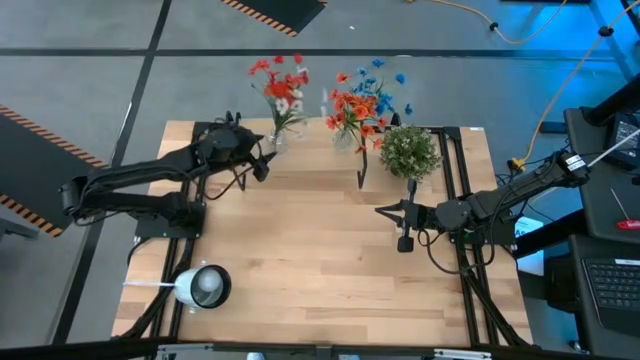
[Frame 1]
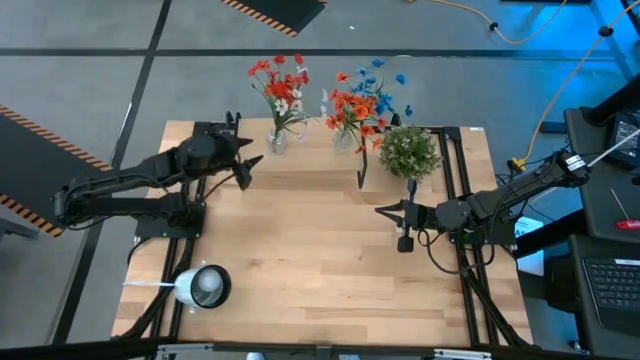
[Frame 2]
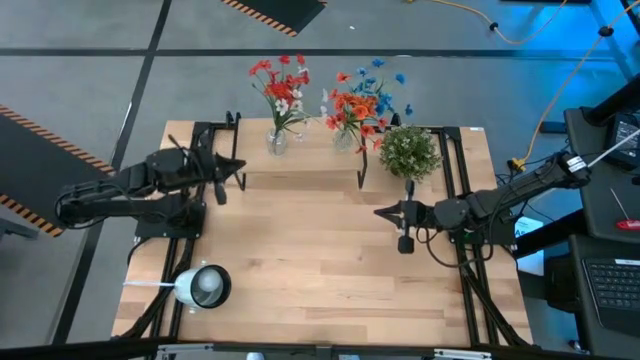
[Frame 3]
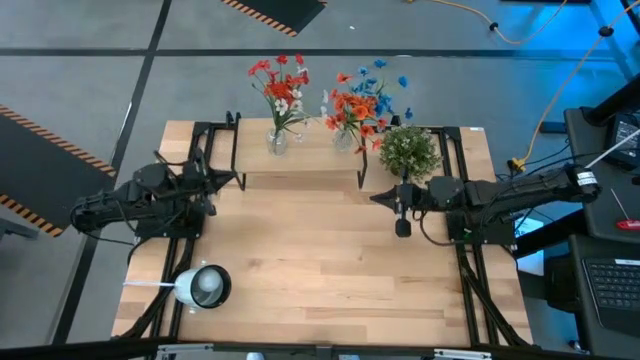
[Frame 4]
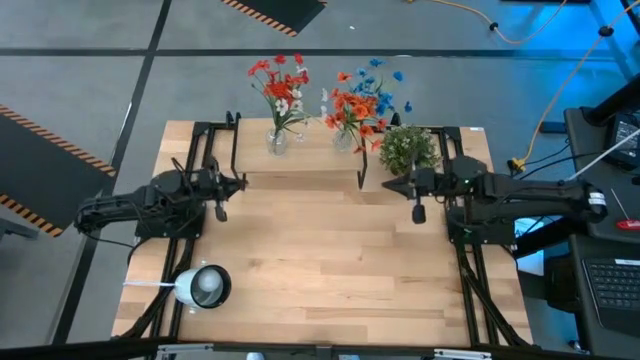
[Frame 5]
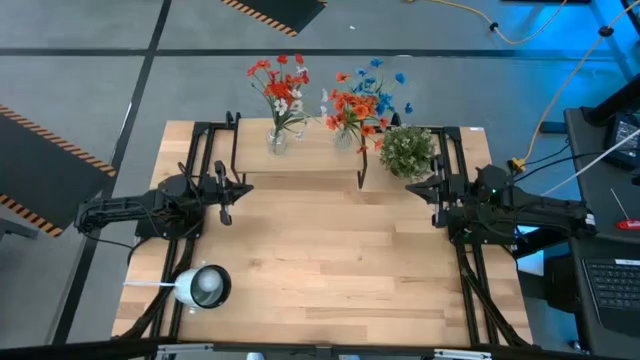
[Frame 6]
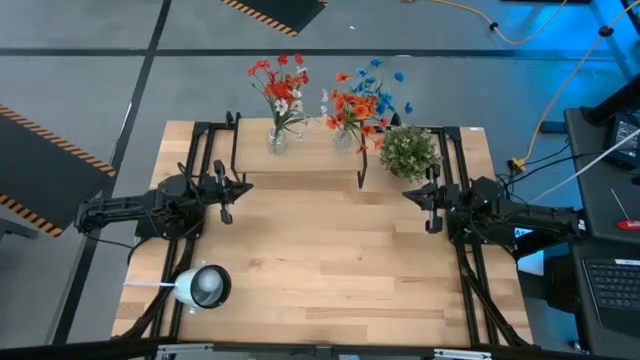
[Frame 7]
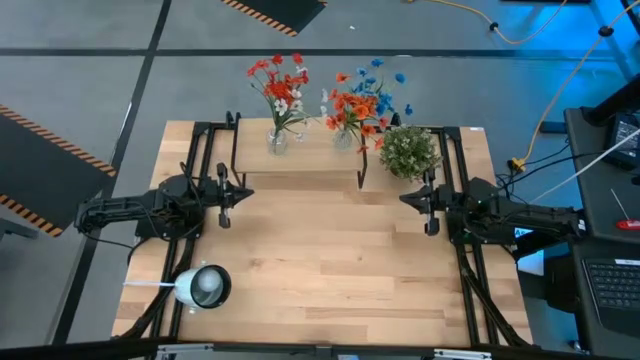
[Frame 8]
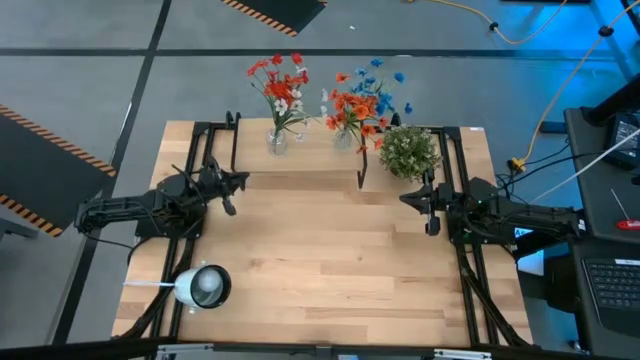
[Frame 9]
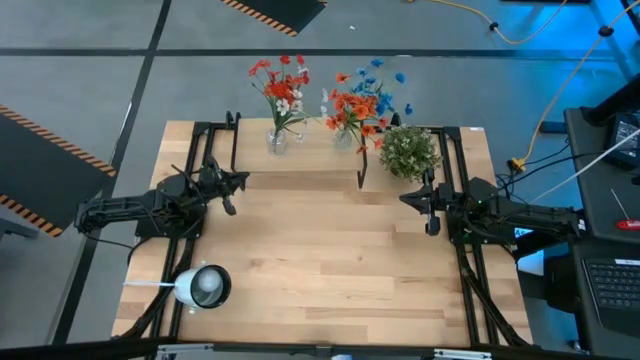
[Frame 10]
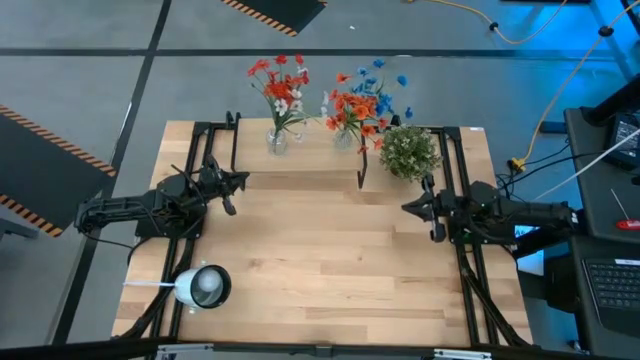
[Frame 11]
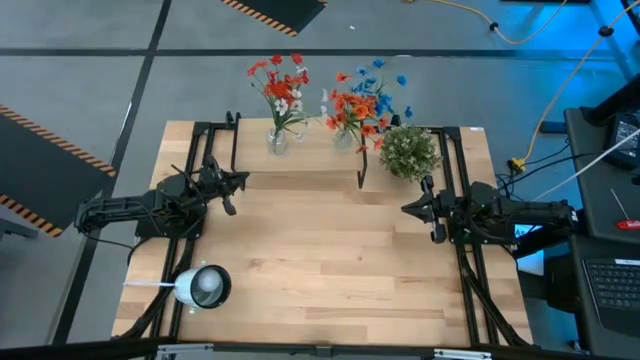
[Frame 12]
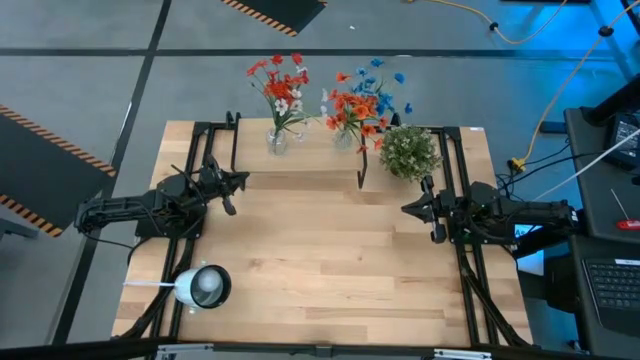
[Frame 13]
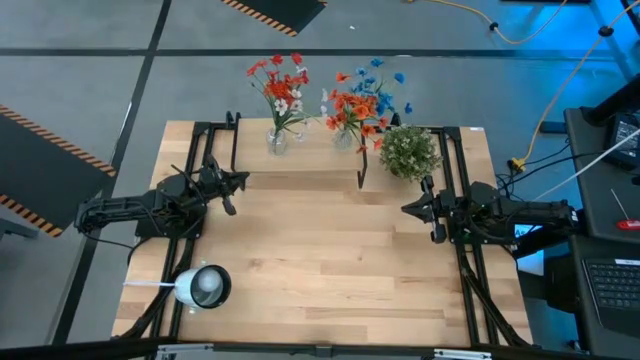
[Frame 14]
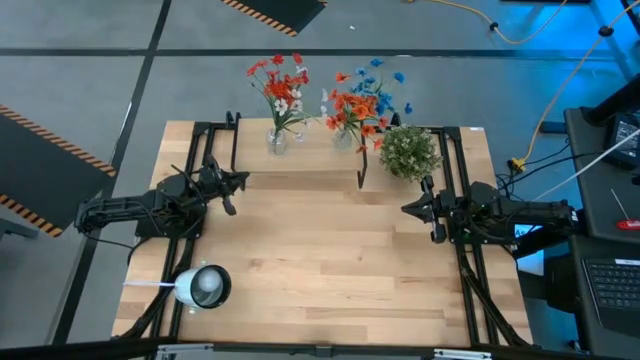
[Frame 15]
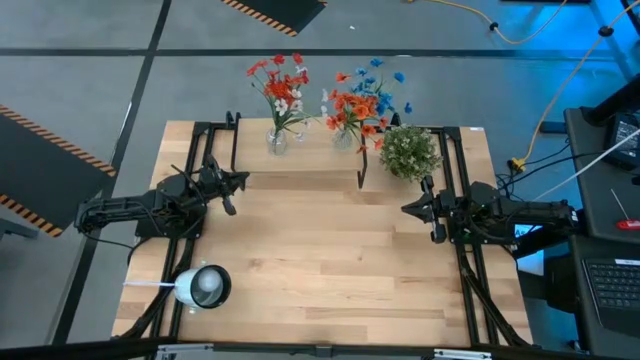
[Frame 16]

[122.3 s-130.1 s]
Task: Pick and place flowers into a vace then onto a shelf
Return to Home Position

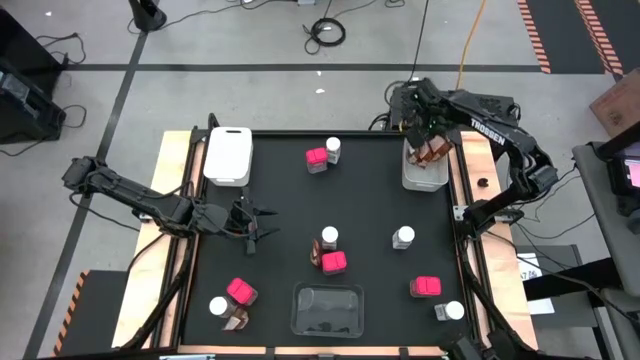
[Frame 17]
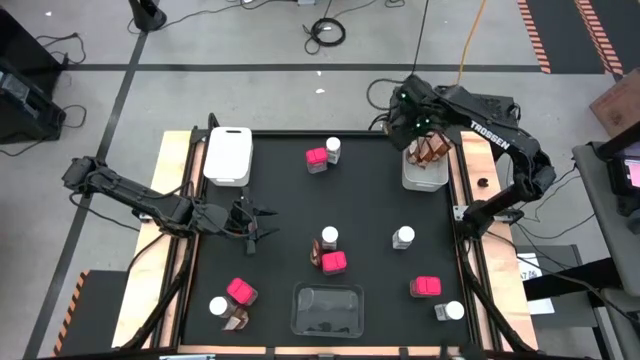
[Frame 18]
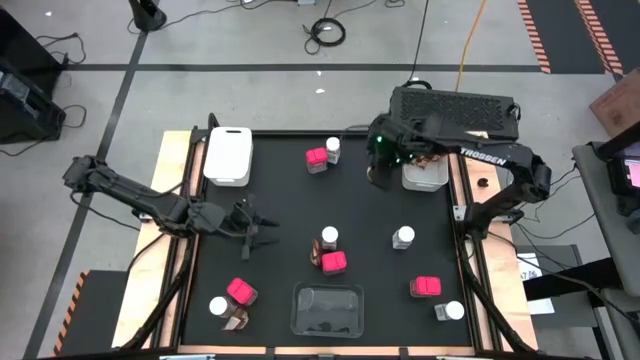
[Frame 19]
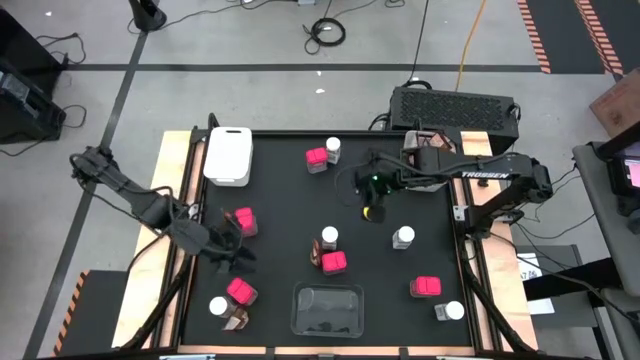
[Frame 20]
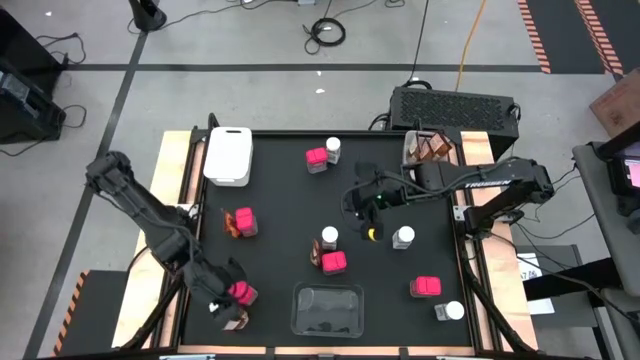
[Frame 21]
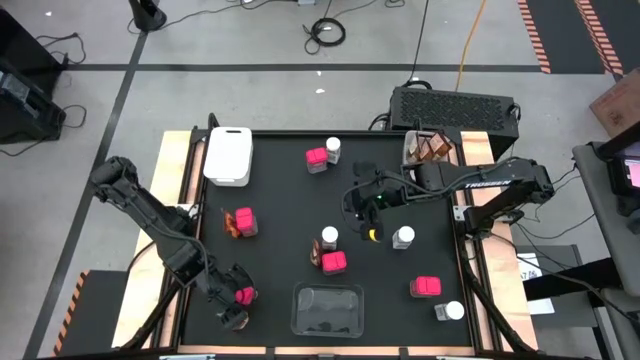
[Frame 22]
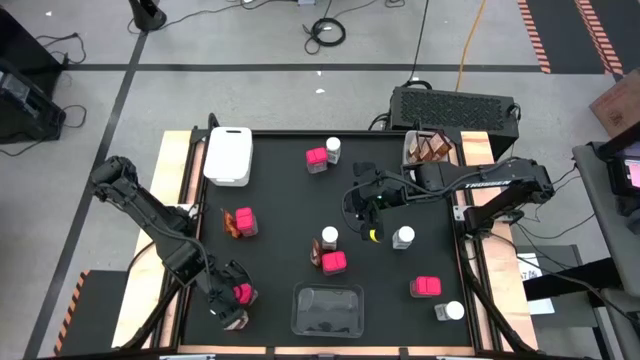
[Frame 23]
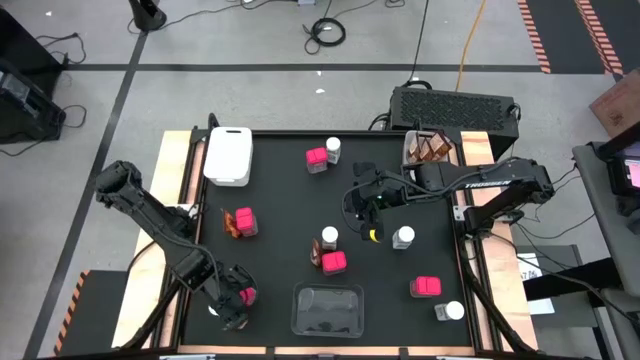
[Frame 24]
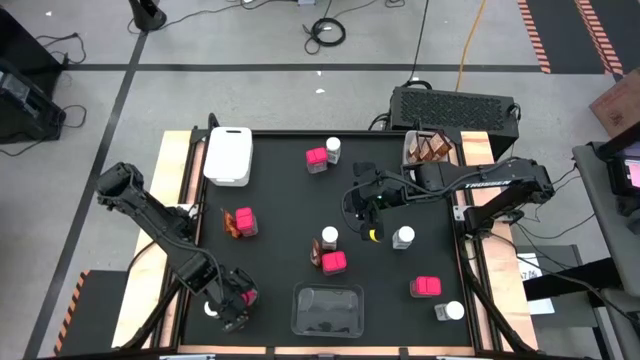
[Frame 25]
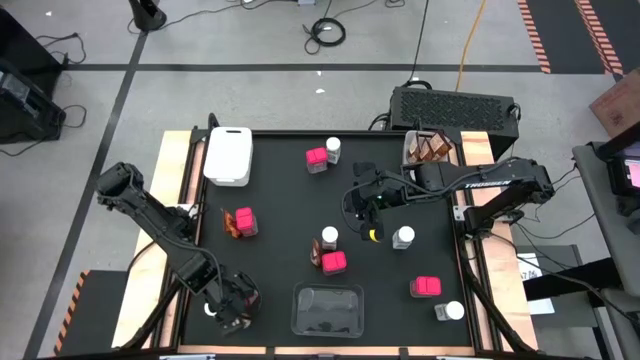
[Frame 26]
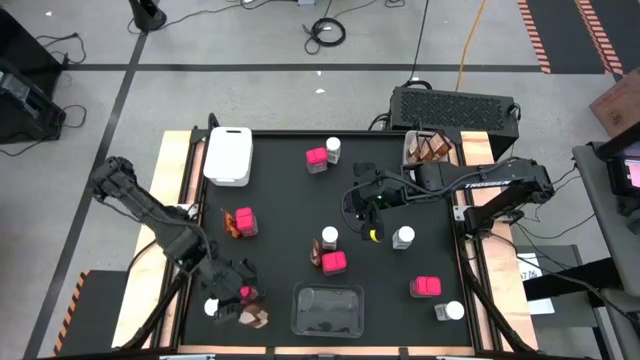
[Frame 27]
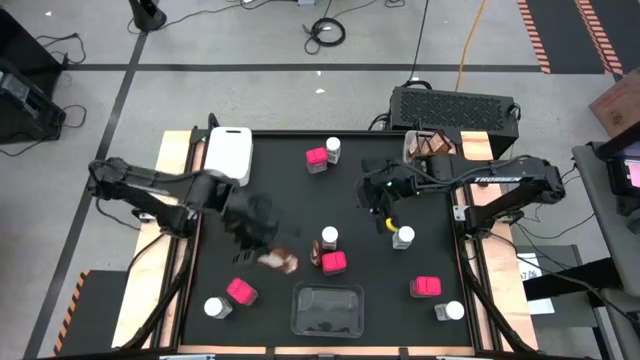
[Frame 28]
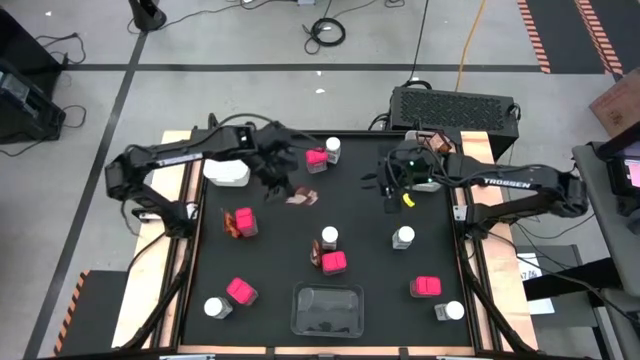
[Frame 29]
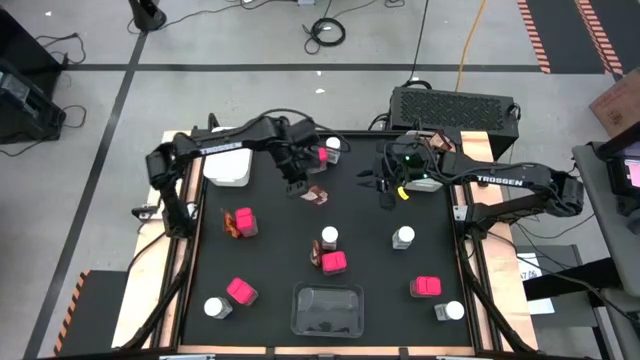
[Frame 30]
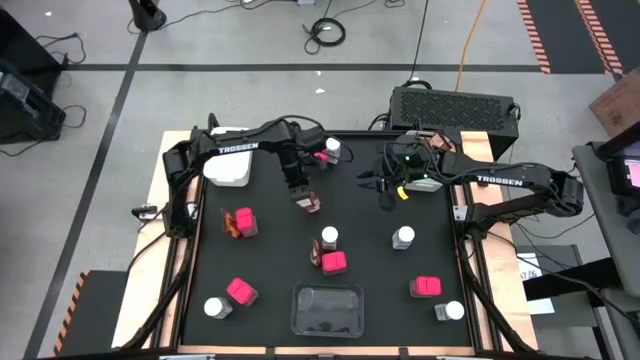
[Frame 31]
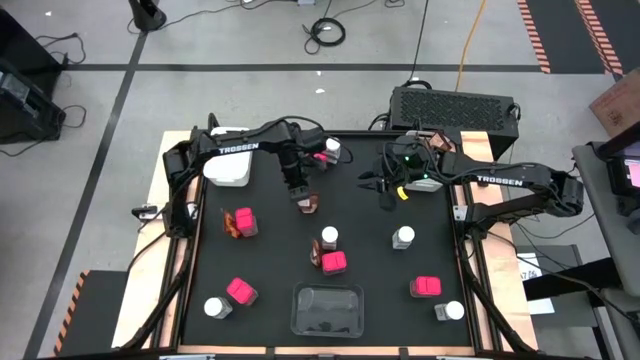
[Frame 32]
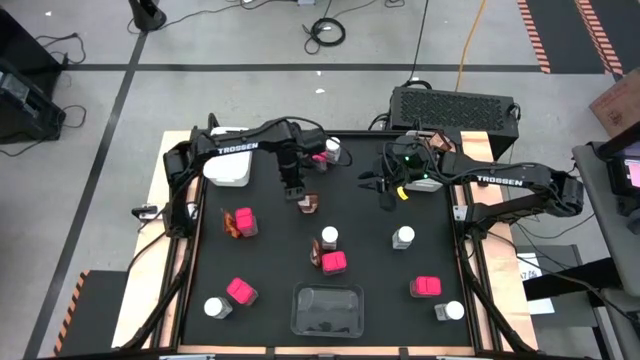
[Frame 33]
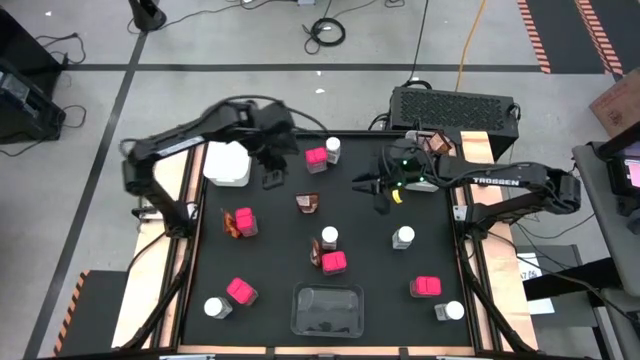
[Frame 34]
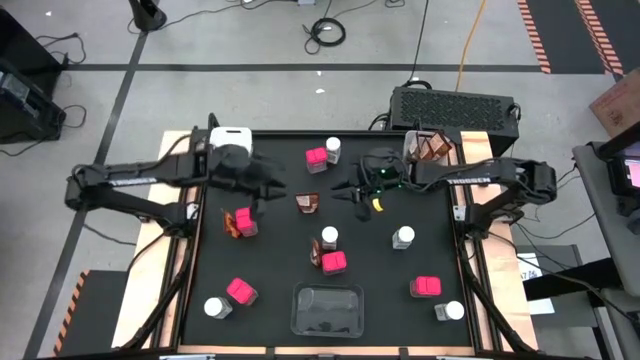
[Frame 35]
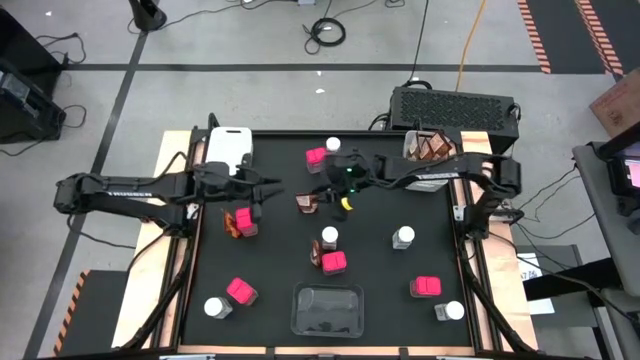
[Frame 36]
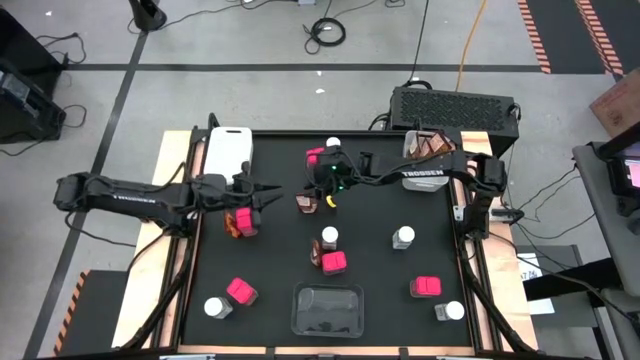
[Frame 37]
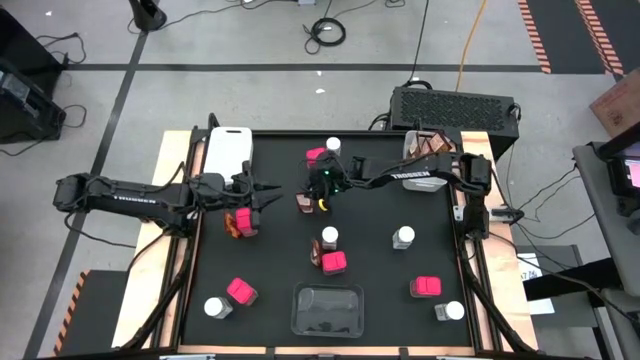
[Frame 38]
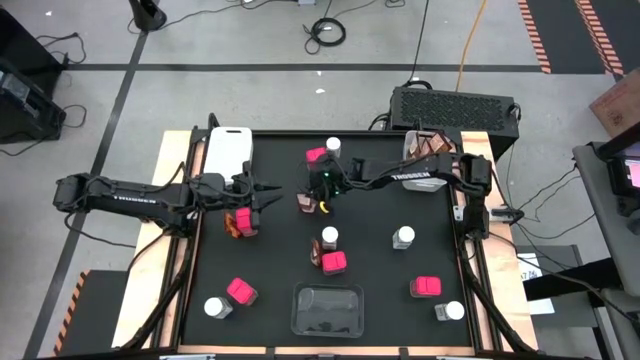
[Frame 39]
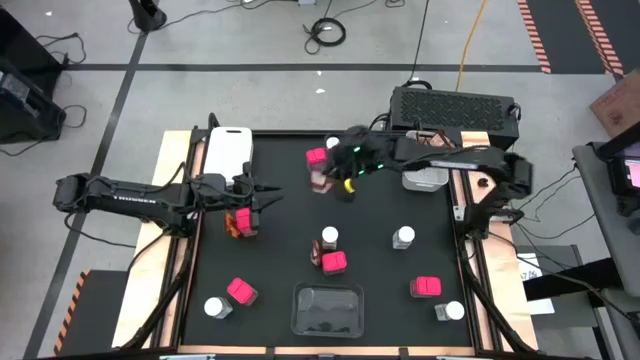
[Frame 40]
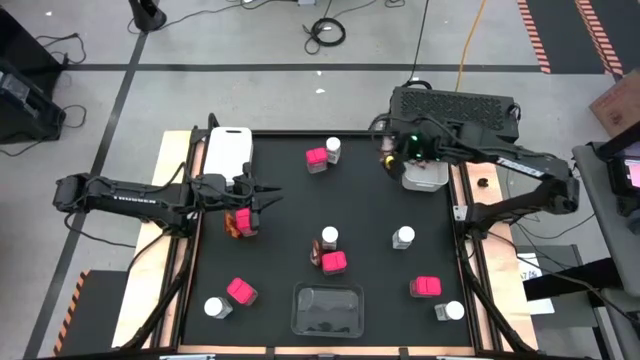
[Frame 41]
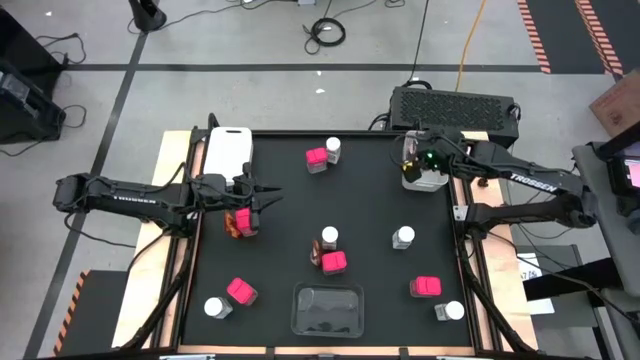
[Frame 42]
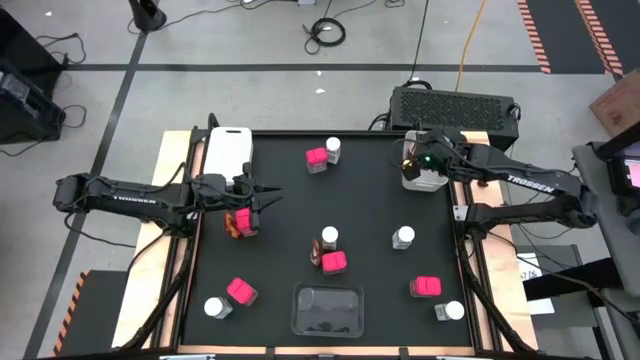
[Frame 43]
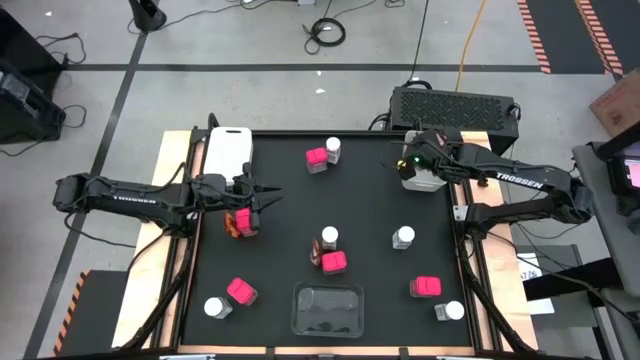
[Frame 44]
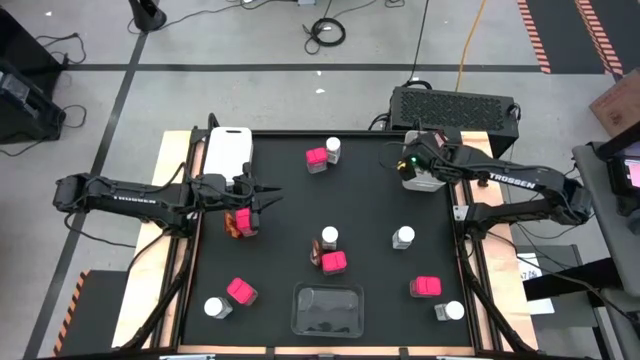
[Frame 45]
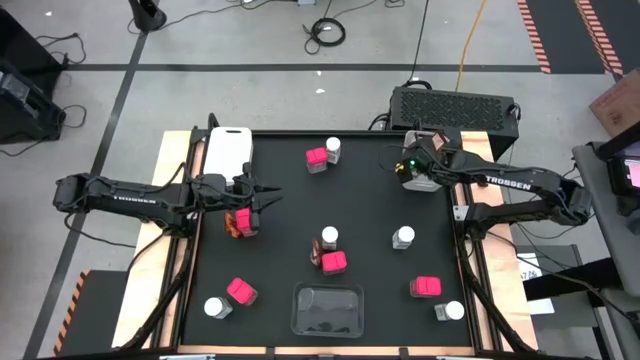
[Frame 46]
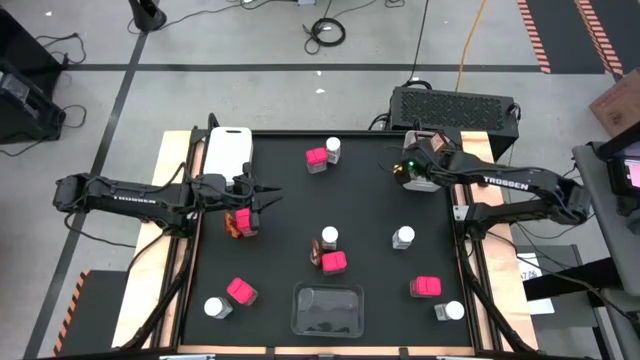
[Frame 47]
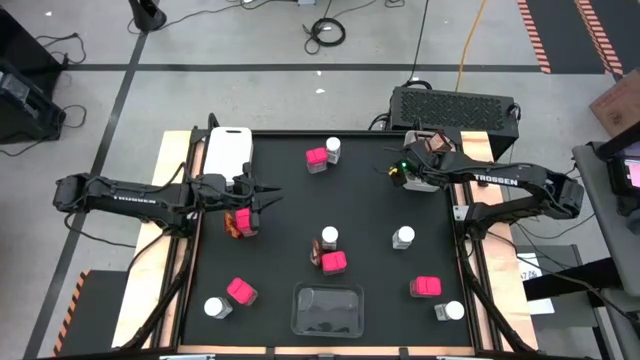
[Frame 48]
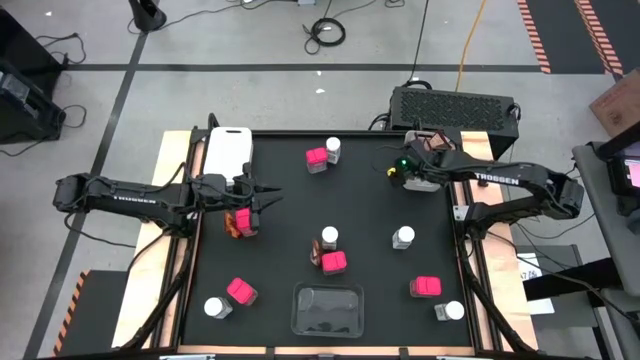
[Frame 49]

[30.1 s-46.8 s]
Task: Sort spices by type
Put the brown seasoning pack into the right white bin
